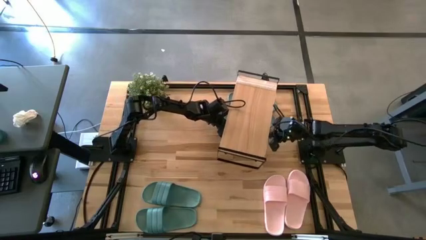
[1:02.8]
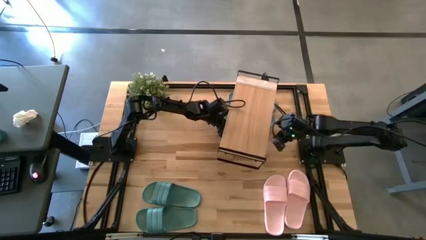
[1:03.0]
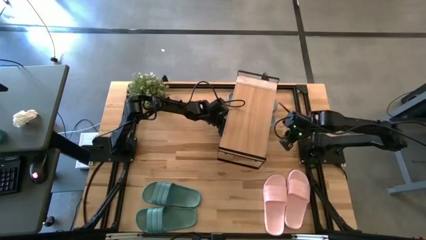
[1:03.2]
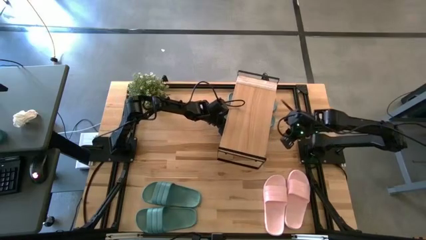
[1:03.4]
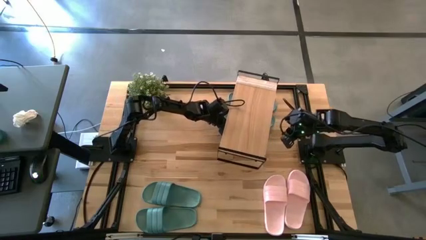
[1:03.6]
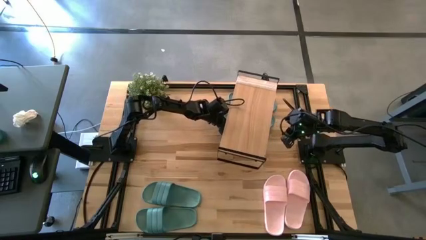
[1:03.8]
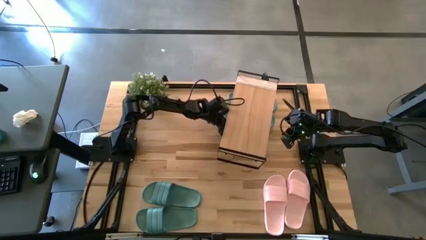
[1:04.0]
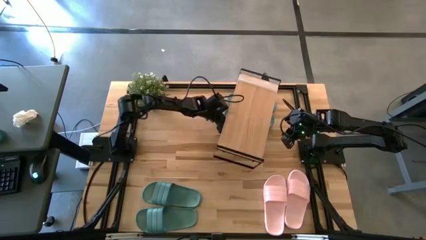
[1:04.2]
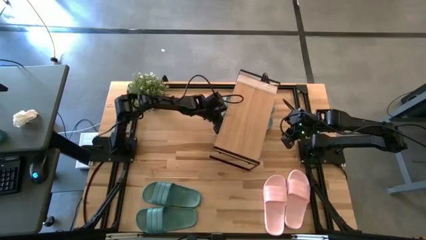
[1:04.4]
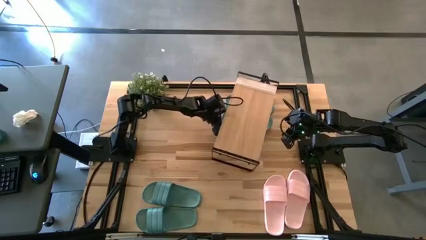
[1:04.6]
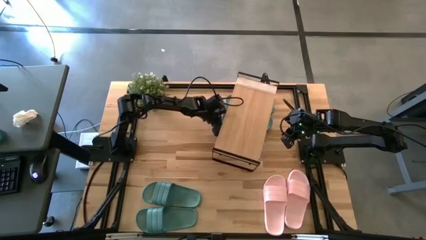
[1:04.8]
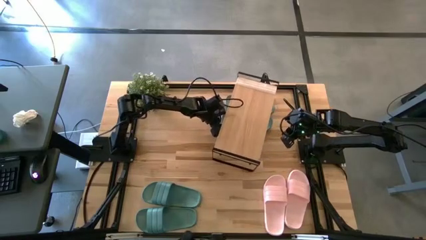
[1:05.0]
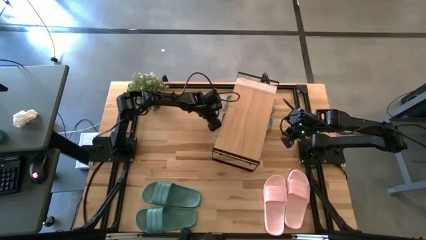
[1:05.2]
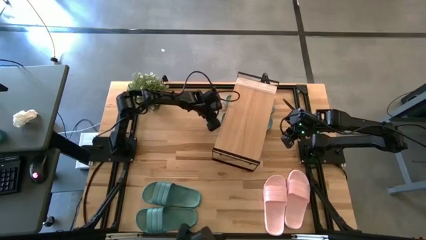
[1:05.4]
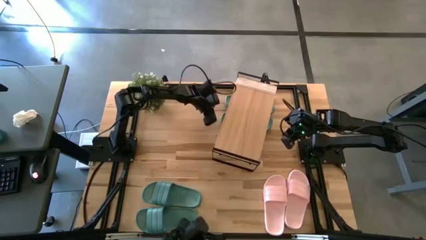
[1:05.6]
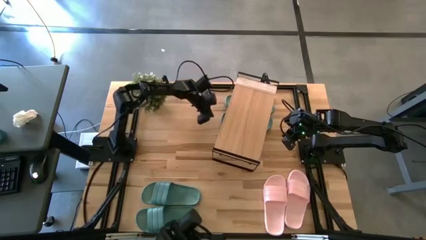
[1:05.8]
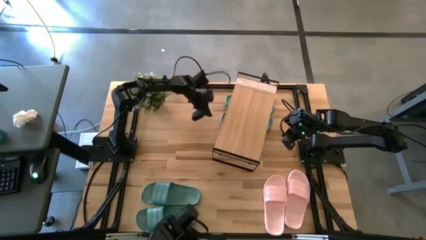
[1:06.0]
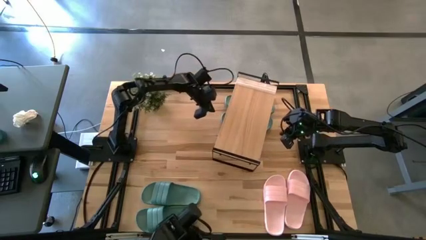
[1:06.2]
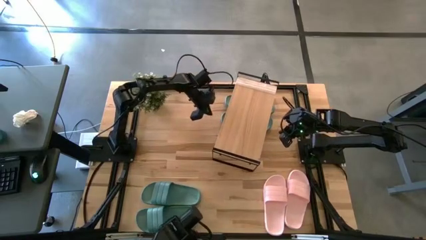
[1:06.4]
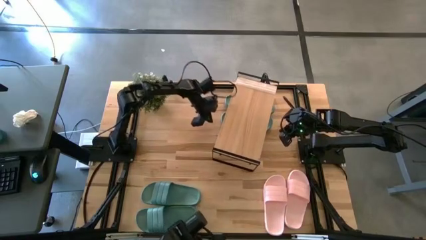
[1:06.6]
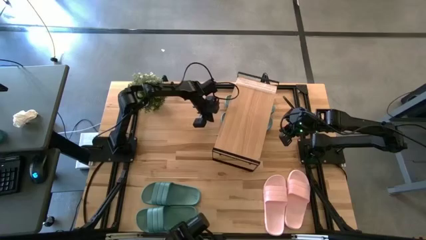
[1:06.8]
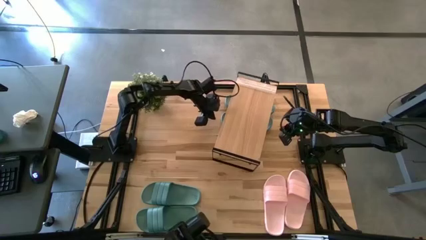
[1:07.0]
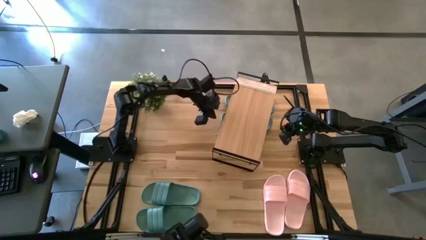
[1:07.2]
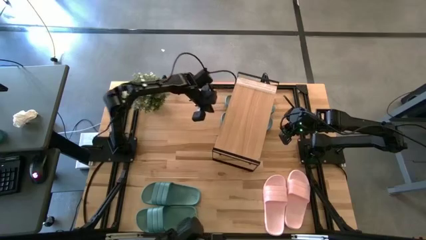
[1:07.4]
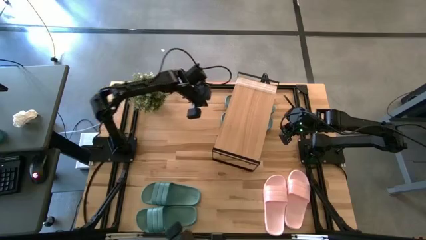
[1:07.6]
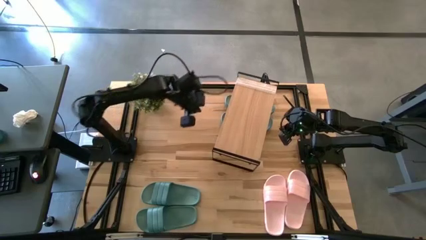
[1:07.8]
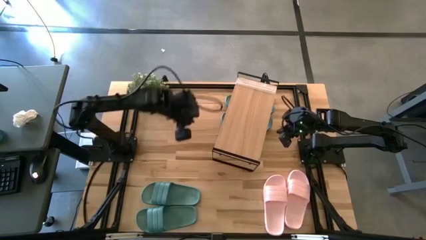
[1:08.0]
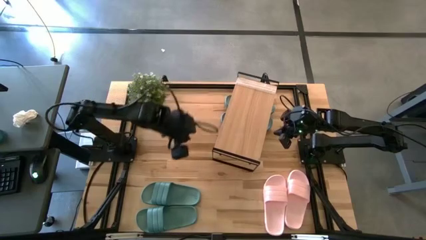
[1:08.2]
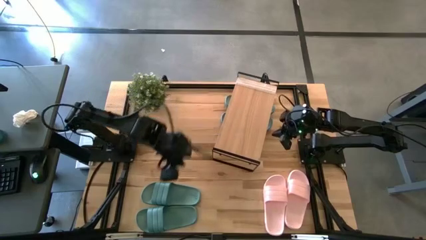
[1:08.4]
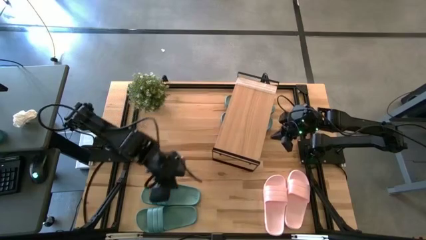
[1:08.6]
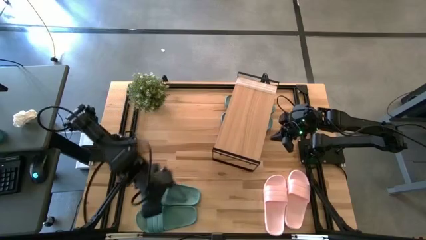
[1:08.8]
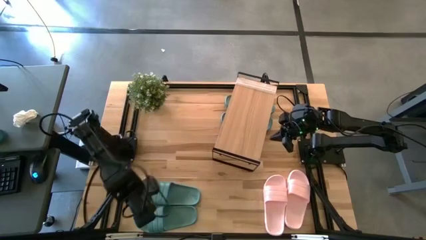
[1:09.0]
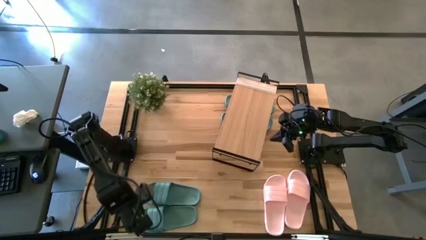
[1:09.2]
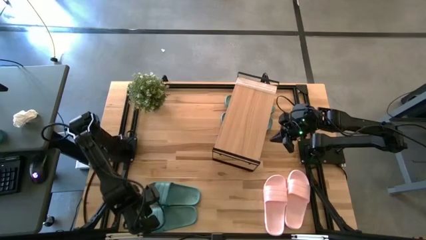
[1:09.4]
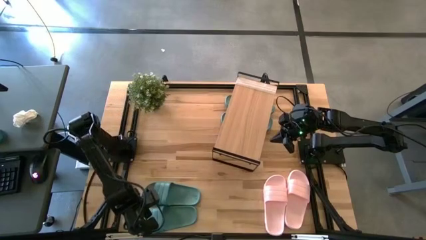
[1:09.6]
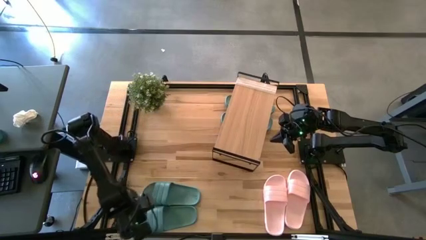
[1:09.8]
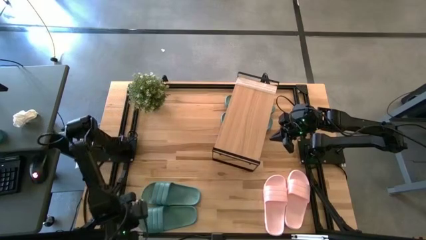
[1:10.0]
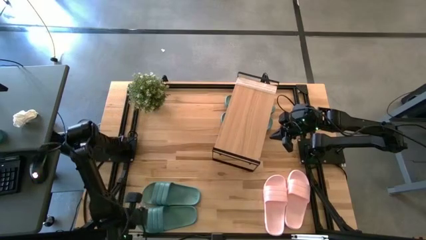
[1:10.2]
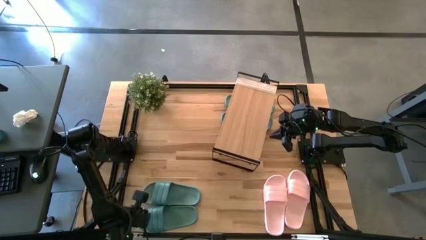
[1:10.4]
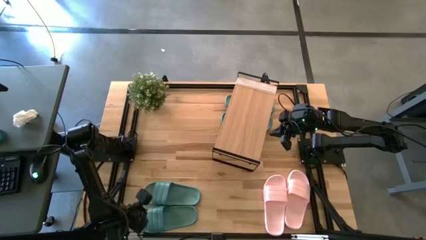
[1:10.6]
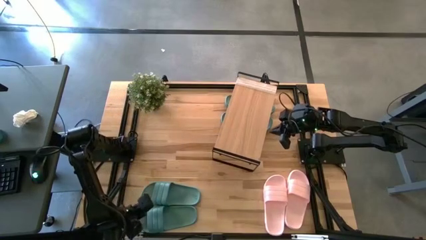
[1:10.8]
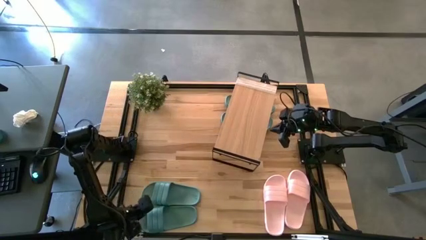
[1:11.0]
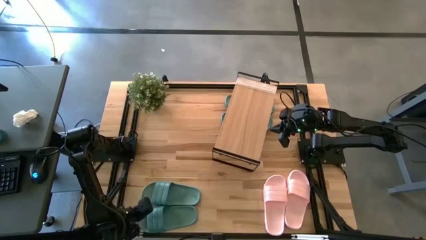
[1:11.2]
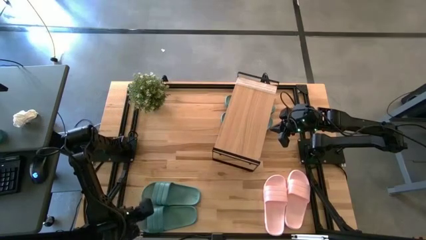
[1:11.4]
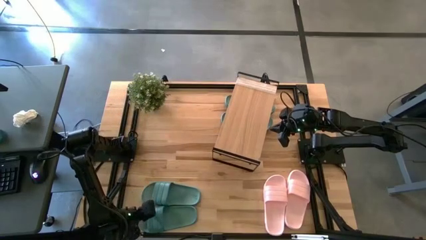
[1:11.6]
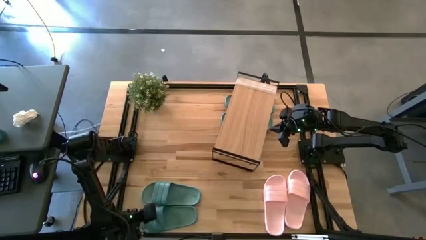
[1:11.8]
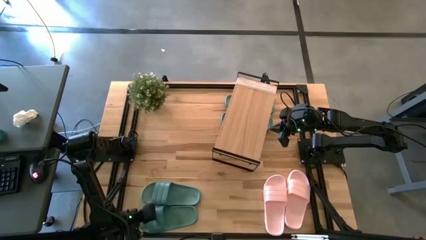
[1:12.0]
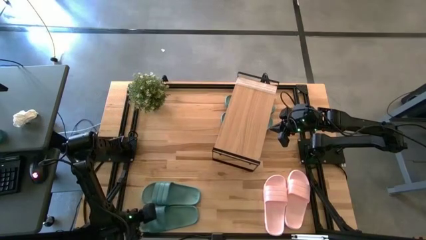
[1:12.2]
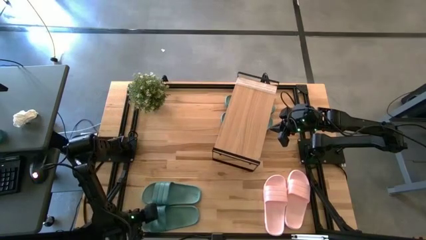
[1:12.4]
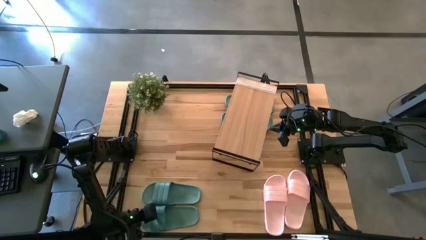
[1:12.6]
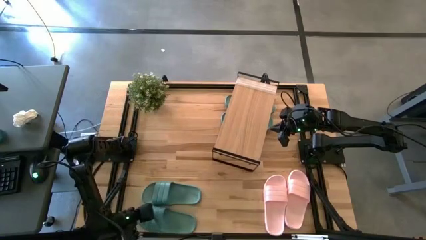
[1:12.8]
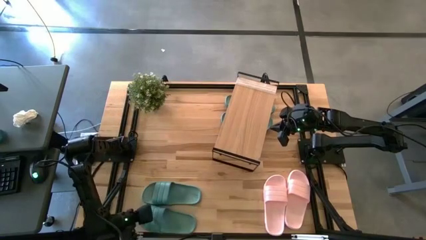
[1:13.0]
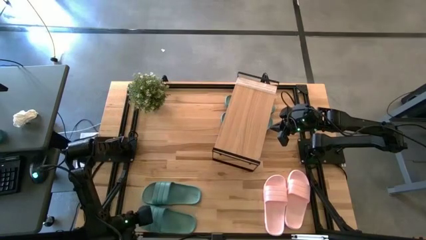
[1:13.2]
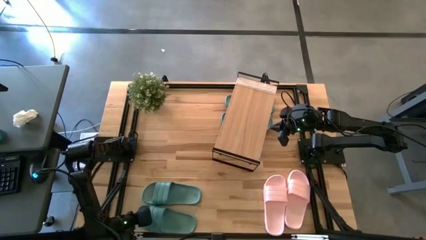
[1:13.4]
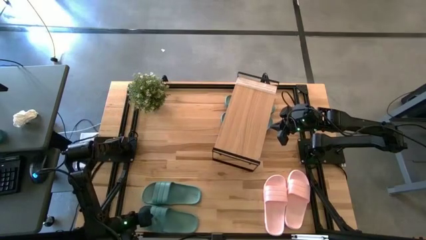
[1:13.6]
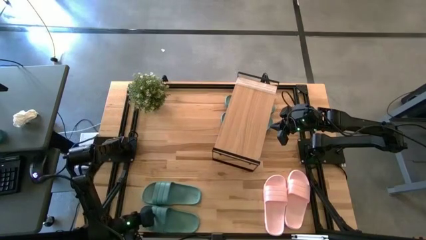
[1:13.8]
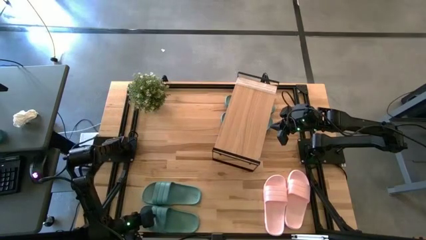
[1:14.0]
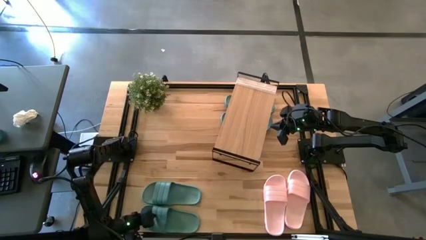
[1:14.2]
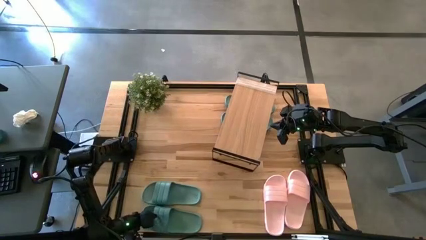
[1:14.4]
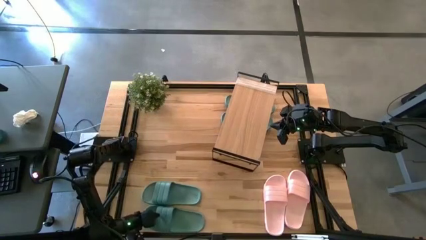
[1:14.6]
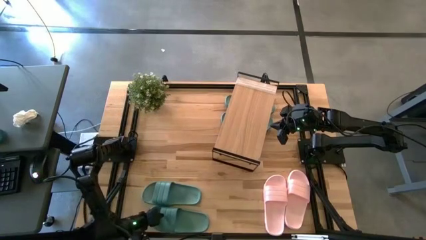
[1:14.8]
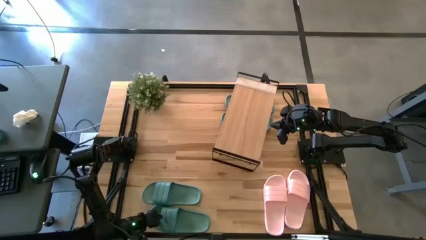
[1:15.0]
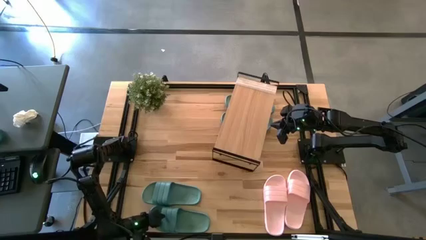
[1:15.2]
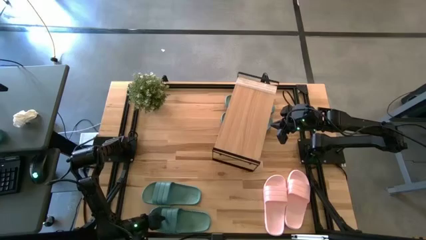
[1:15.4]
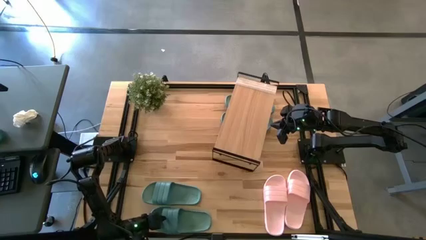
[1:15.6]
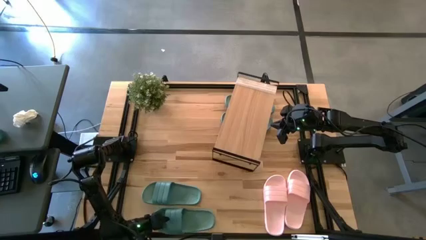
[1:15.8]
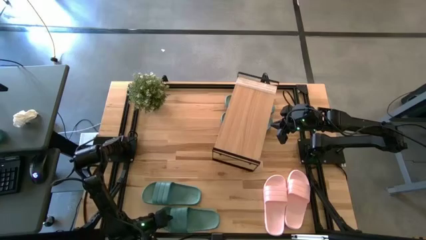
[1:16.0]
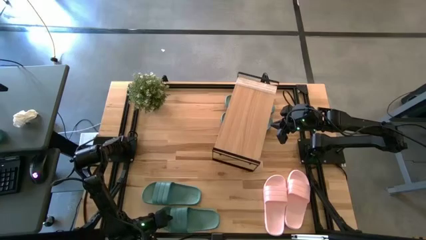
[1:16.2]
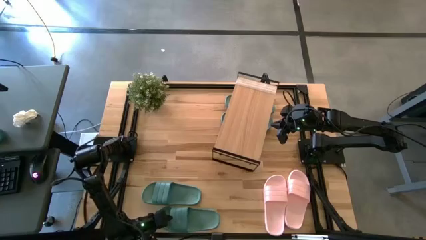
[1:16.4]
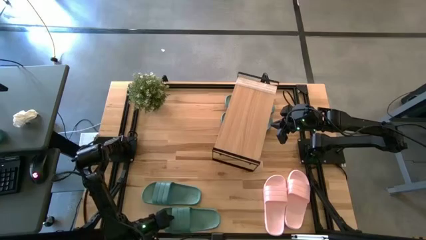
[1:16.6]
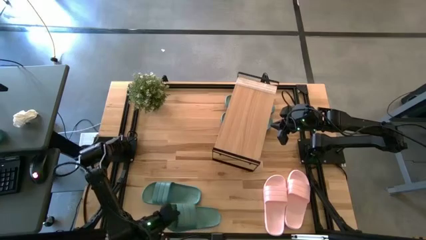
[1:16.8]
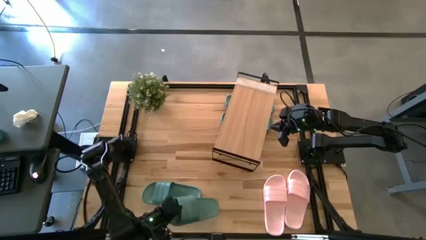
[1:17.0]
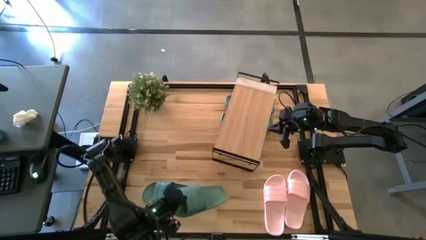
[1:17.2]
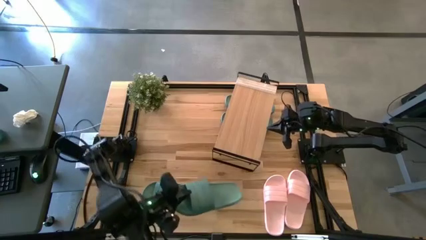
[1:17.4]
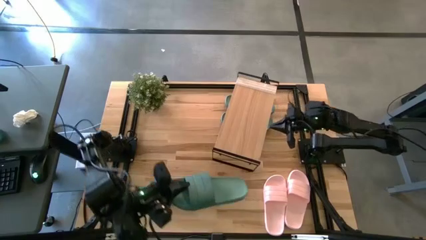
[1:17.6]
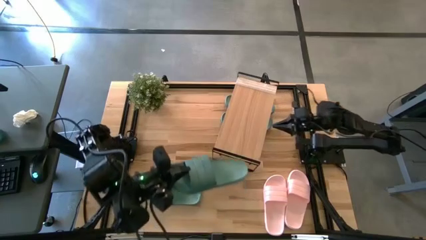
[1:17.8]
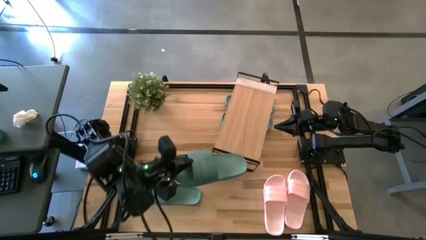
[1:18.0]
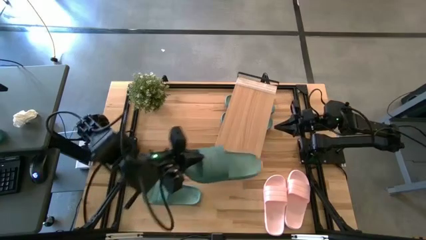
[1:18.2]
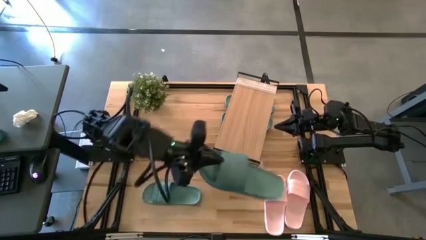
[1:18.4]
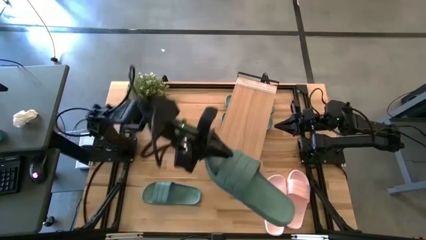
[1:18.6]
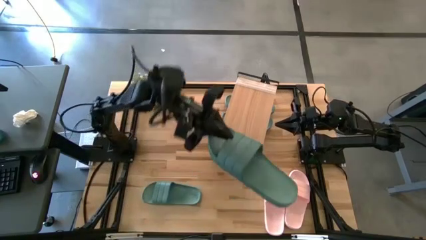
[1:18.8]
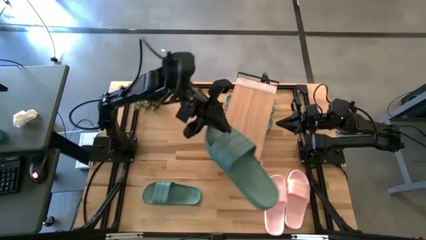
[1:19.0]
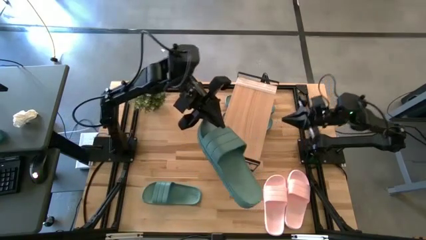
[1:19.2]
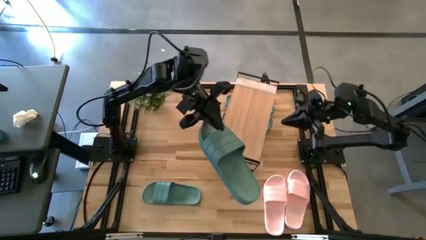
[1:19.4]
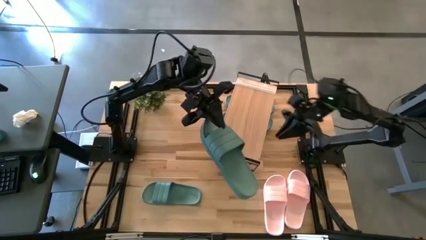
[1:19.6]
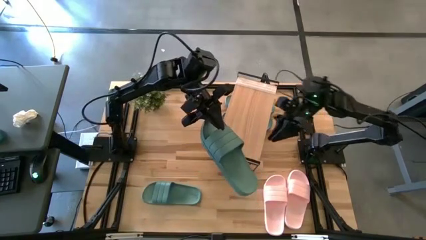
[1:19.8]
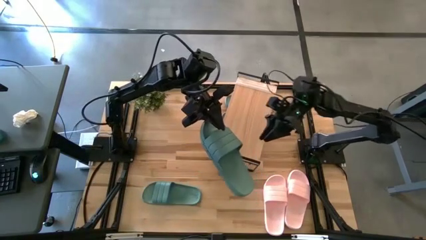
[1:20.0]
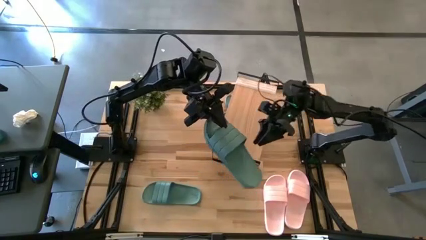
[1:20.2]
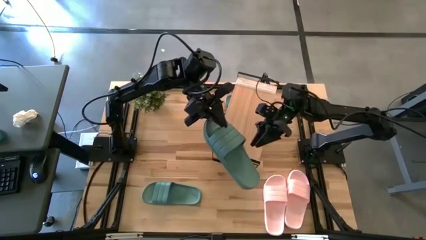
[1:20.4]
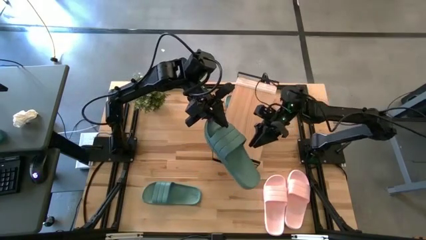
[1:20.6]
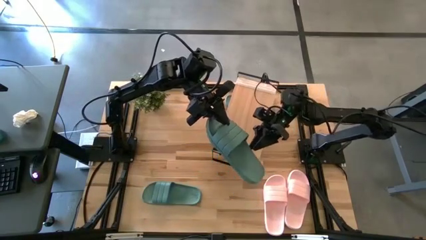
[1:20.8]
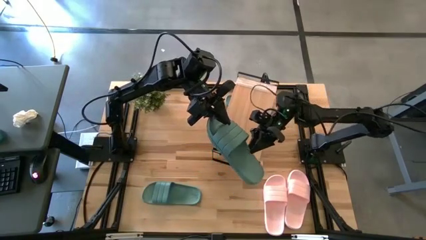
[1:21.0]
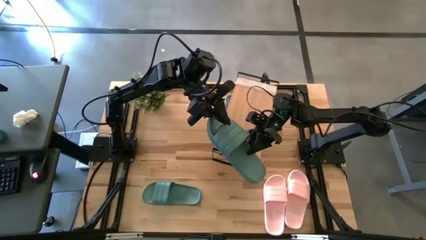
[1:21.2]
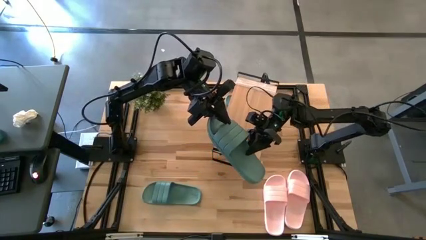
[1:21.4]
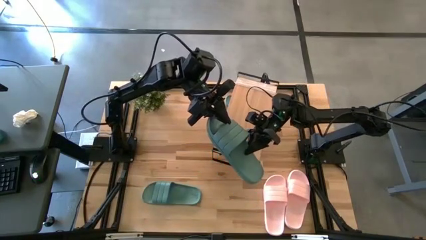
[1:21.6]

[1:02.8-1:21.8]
Task: Pick and place slides into the shelf
Put the green slide under the shelf
